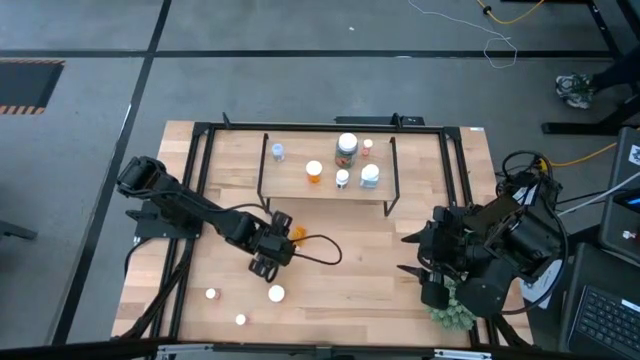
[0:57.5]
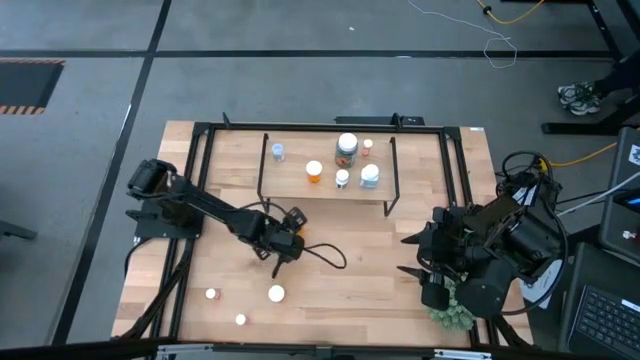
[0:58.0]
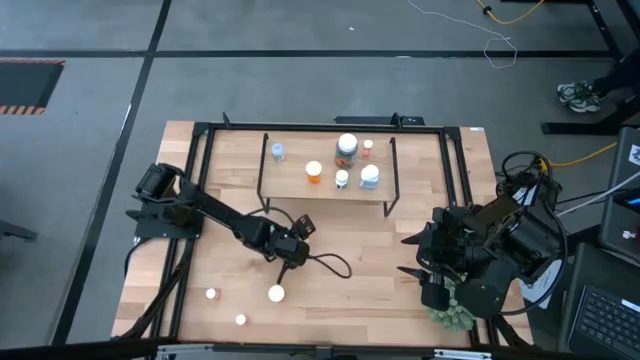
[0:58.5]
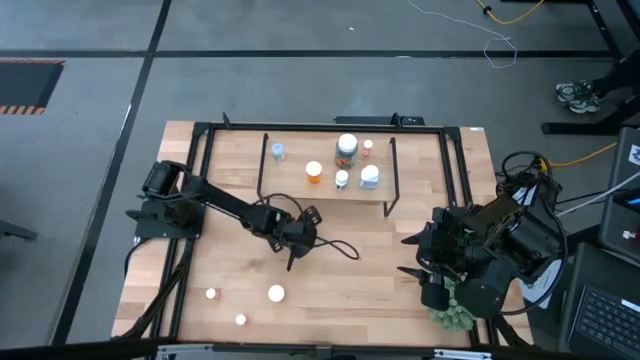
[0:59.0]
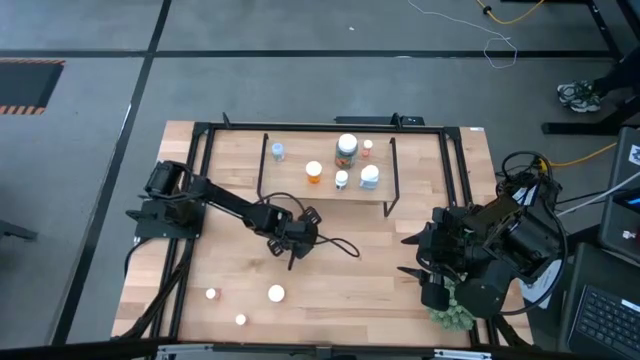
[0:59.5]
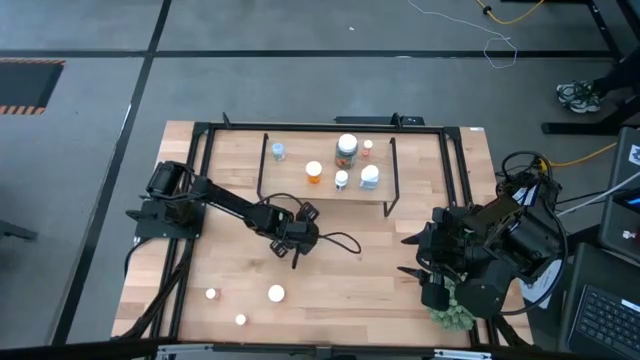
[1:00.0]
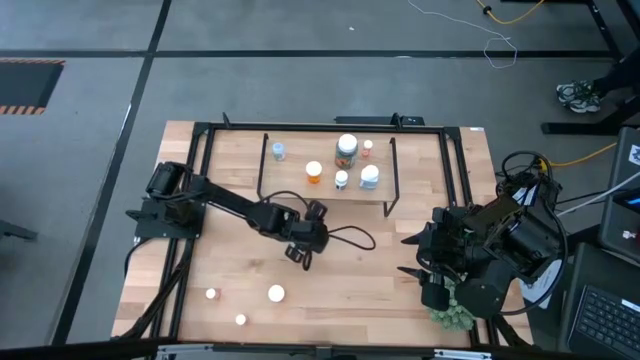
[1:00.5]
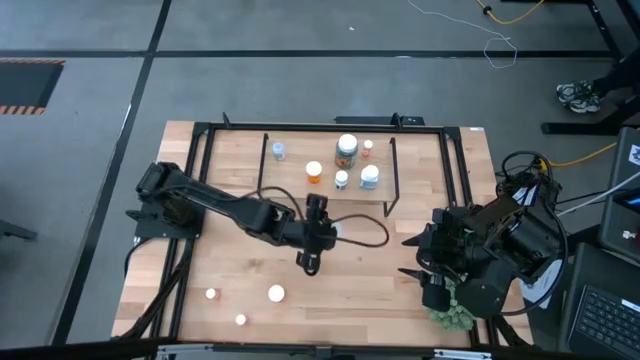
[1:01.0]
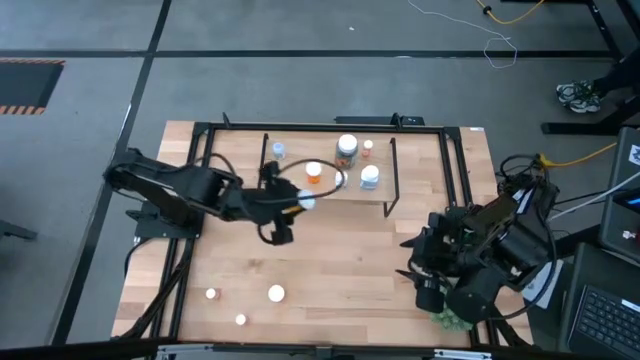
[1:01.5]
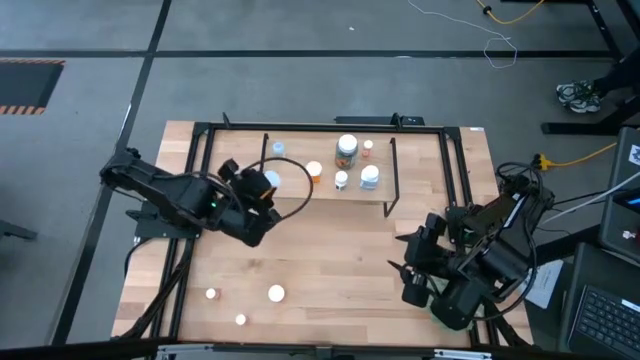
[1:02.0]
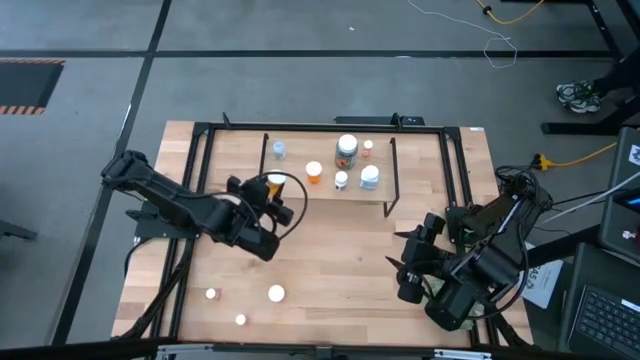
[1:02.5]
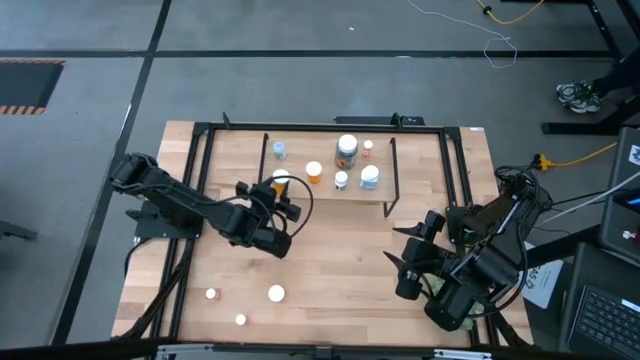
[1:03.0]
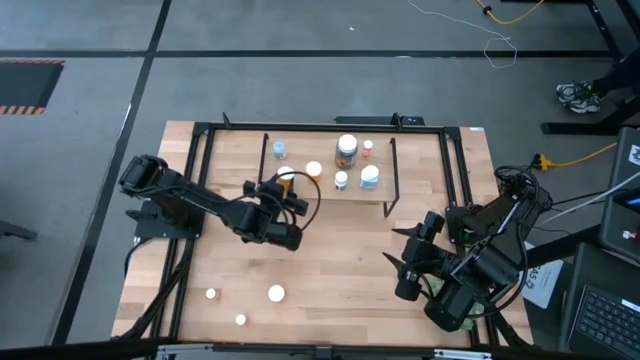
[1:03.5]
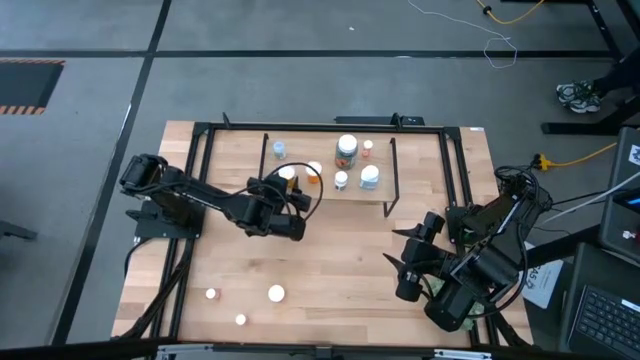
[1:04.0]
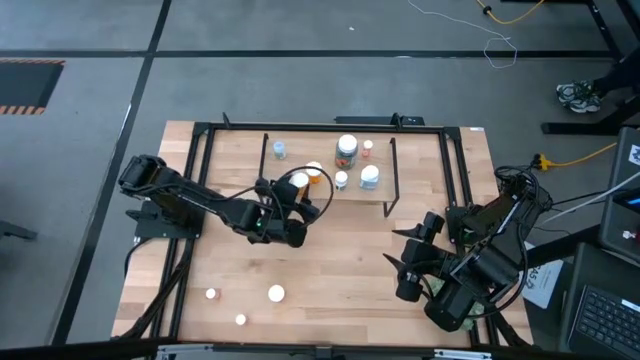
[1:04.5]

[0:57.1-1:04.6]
Task: Pick and place medicine bottles onto shelf by color
Put the top orange pill bottle on the shelf

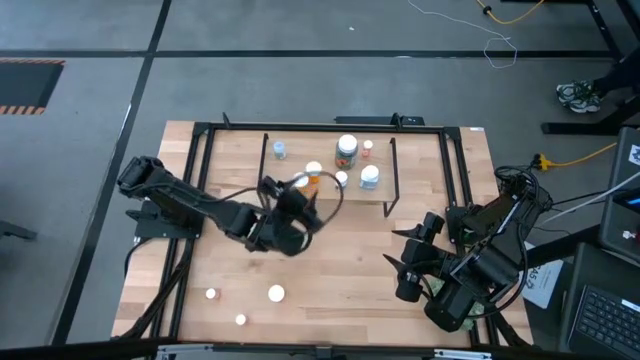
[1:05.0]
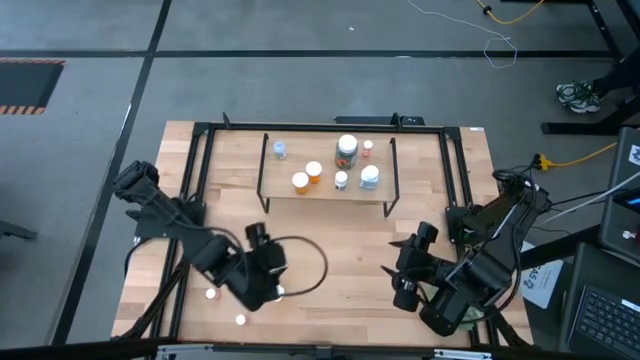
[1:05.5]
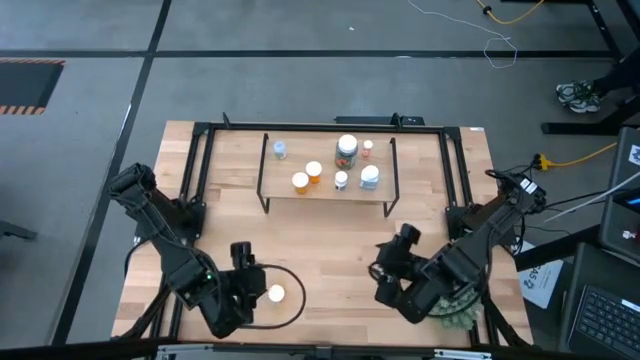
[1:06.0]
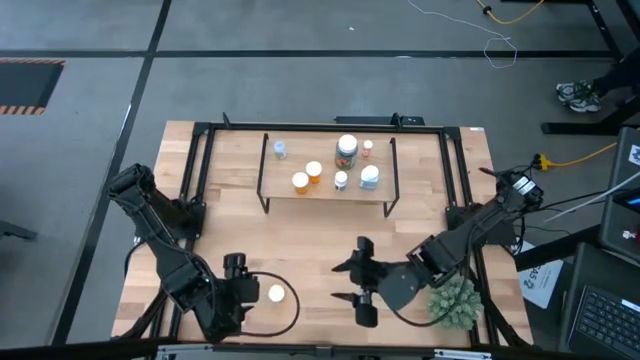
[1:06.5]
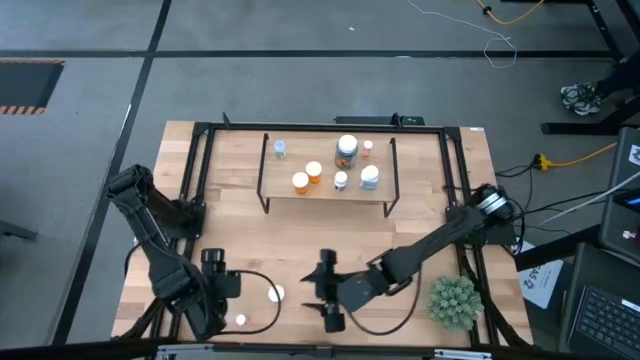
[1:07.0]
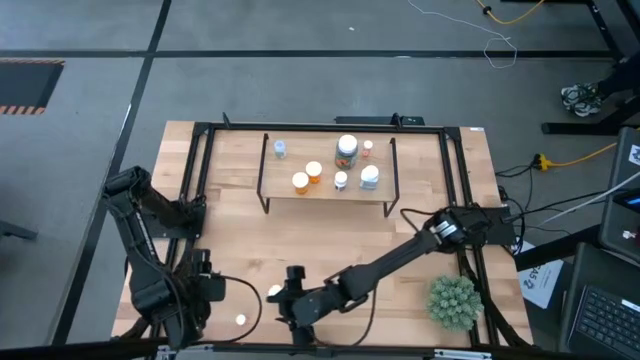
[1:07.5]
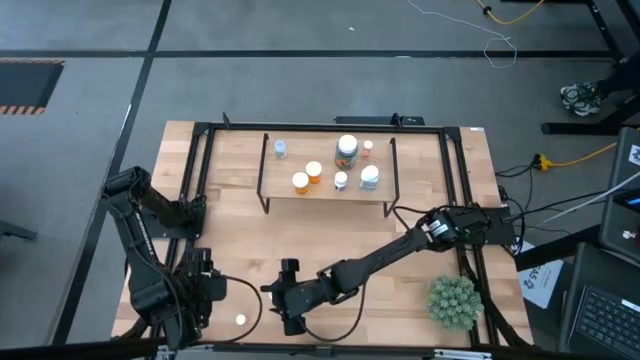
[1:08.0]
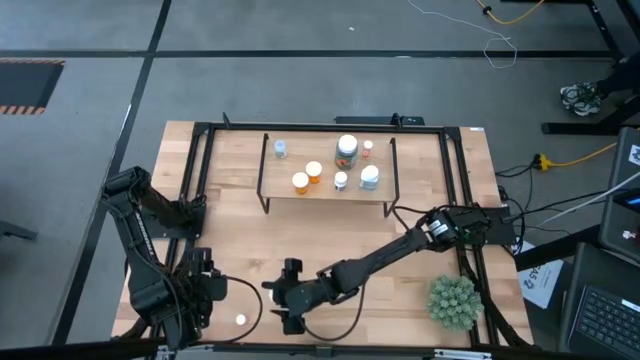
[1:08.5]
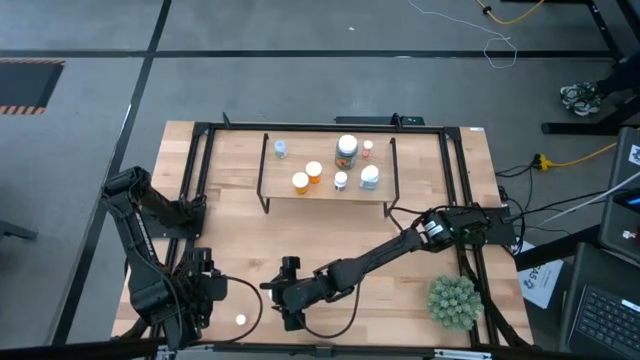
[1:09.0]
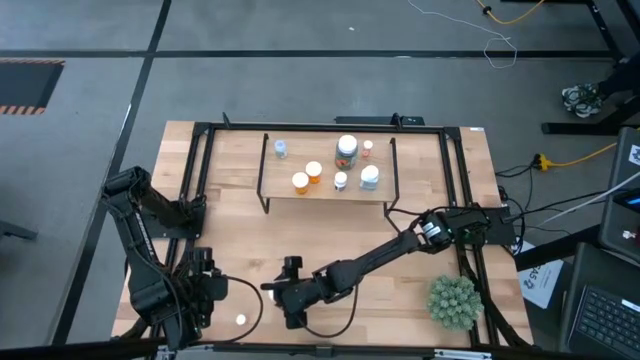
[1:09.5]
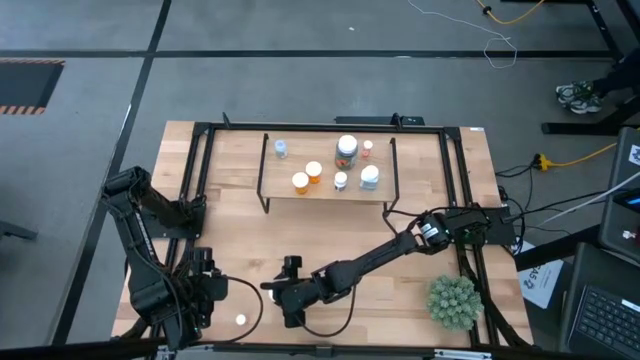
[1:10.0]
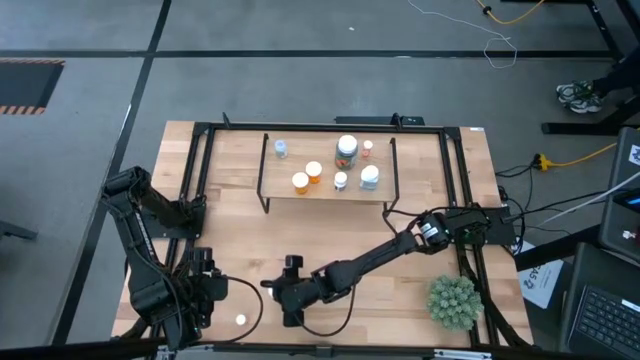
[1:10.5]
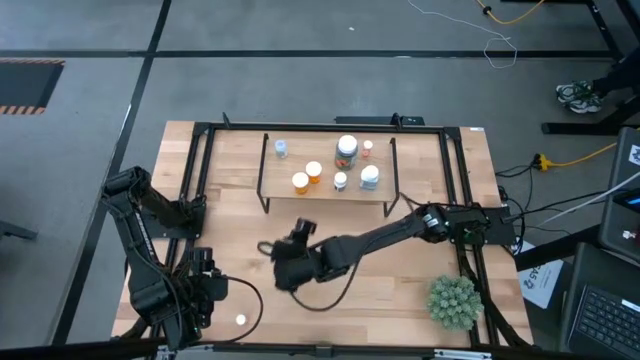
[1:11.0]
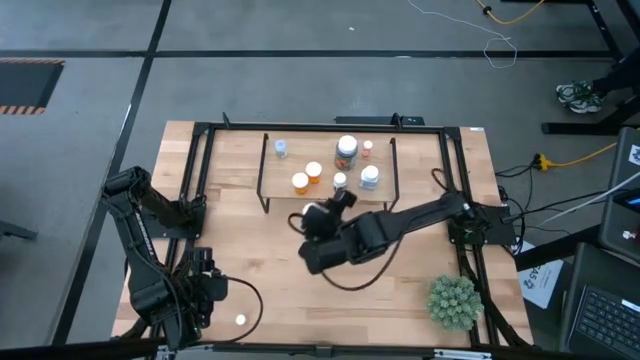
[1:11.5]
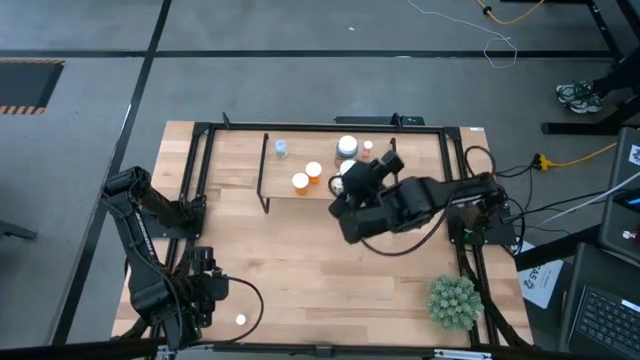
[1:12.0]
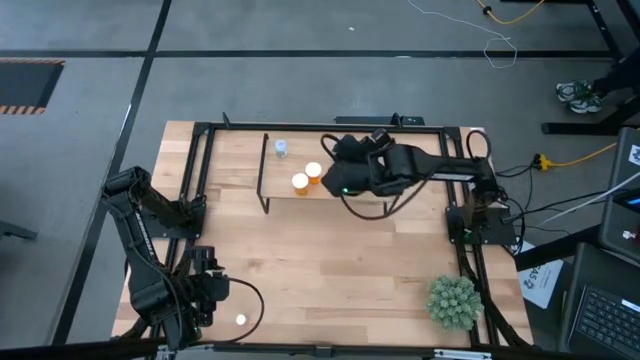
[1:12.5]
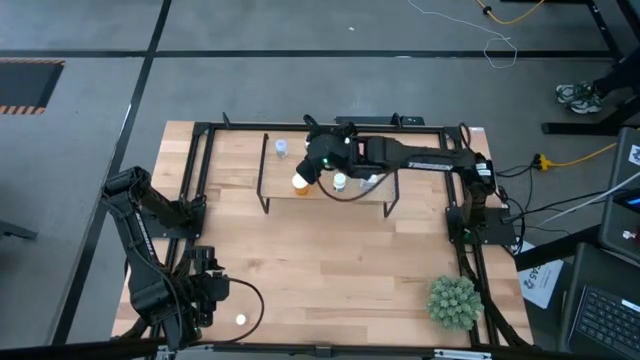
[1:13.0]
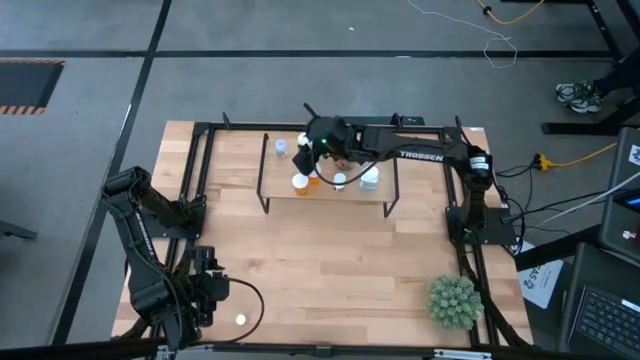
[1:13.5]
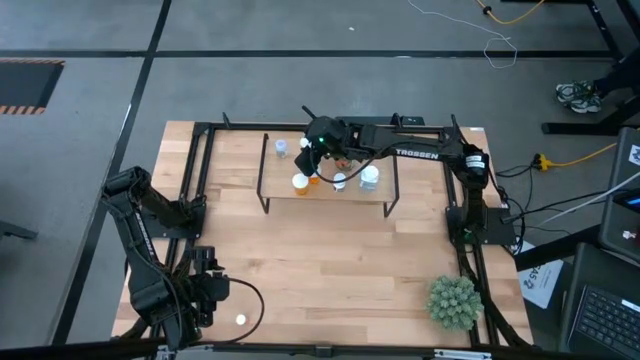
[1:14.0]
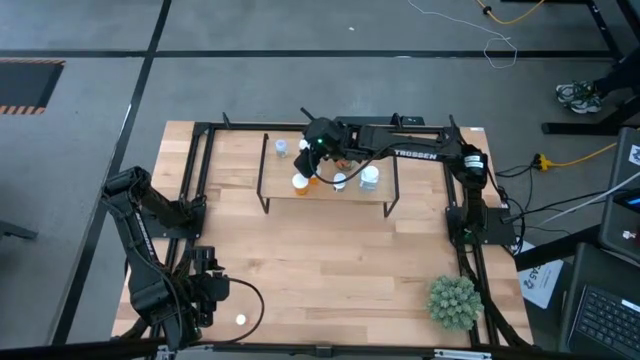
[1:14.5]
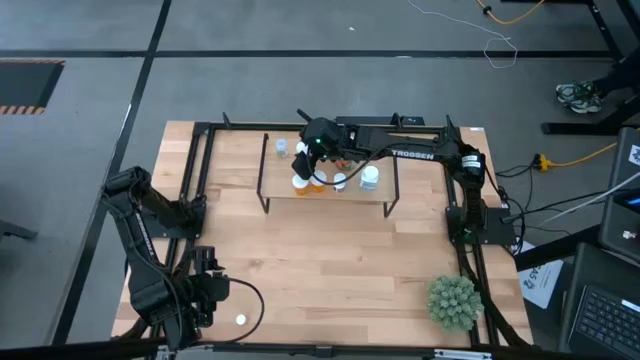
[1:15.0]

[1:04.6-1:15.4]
Put the orange pill bottle on the shelf

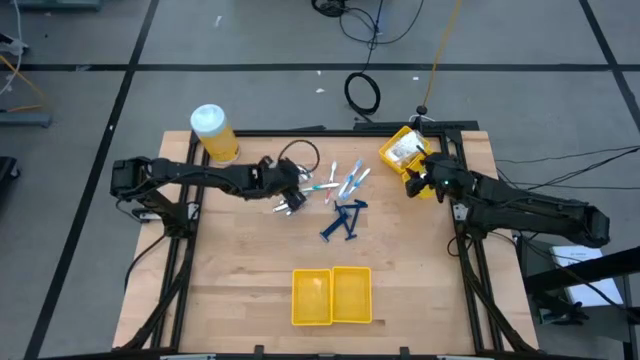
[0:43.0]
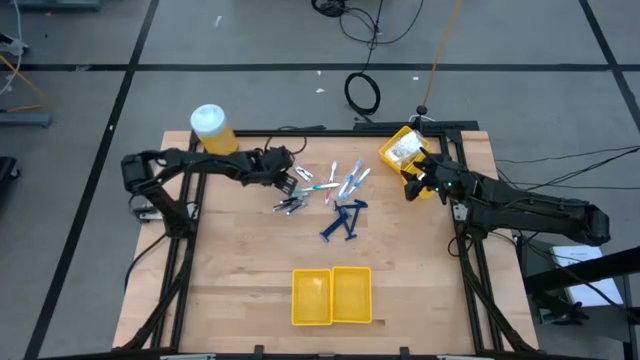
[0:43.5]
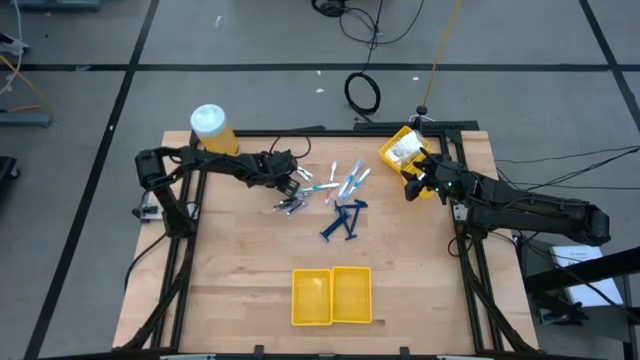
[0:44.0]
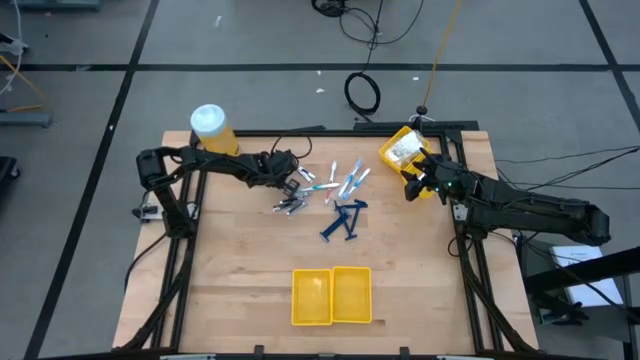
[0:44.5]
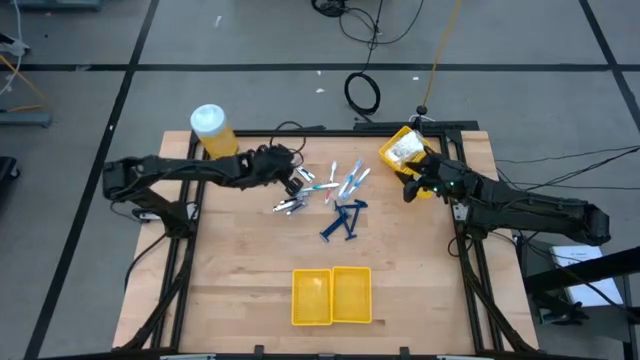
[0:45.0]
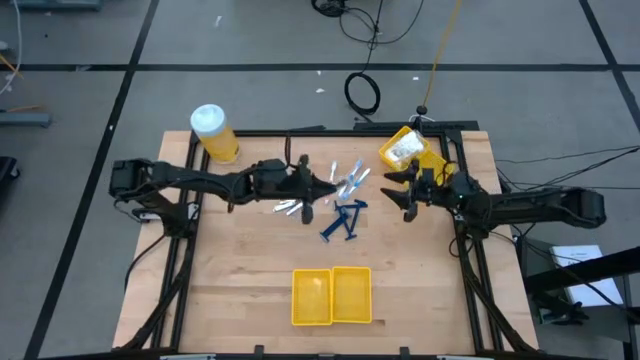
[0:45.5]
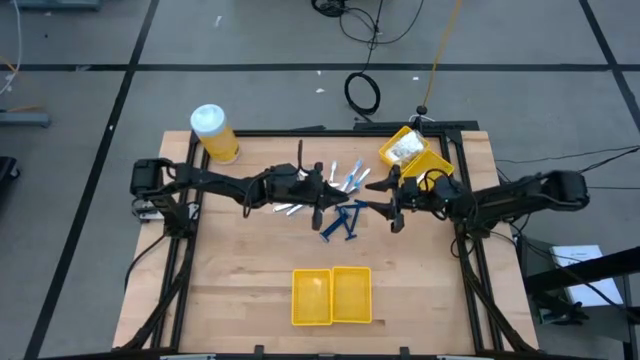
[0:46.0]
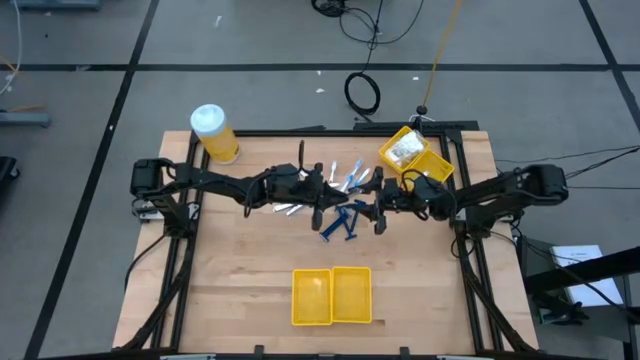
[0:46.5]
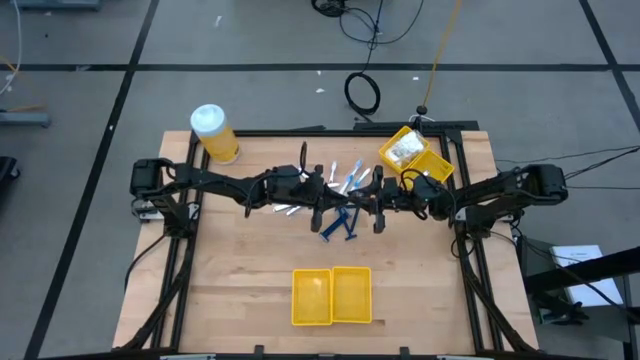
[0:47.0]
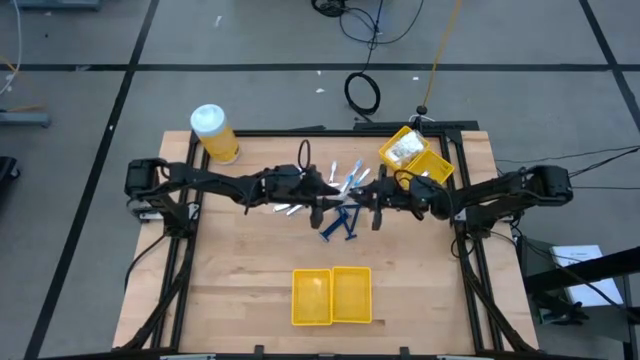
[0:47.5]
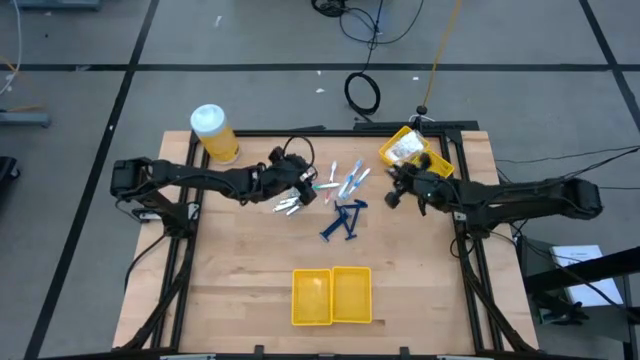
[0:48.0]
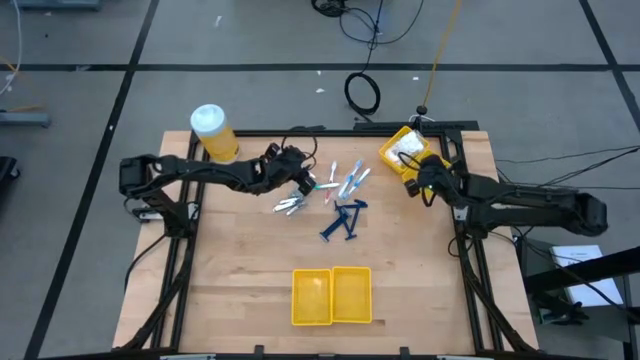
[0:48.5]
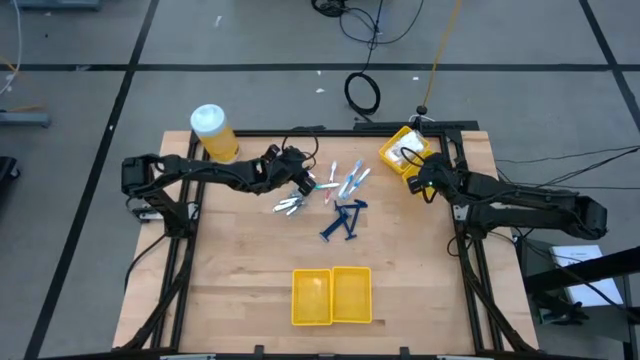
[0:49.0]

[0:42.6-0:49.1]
Task: Pick & Place Travel size toiletries
Put the silver nail cutter into the top right yellow bin
